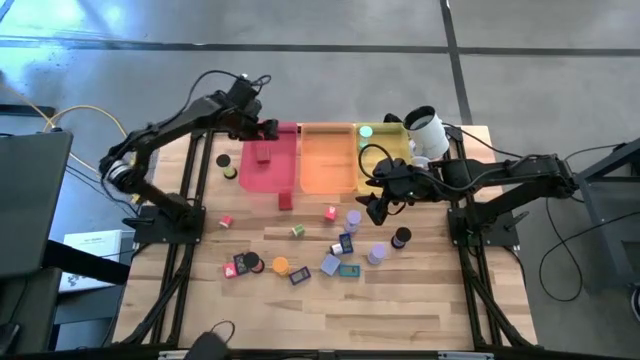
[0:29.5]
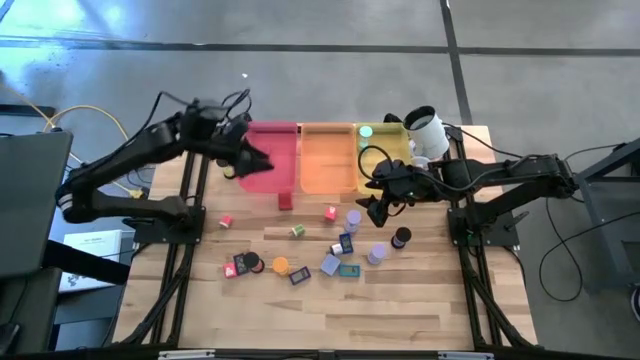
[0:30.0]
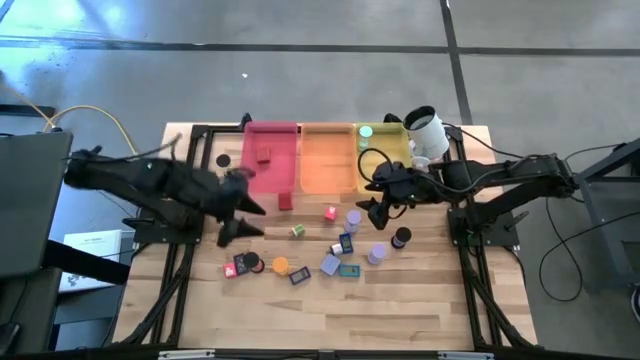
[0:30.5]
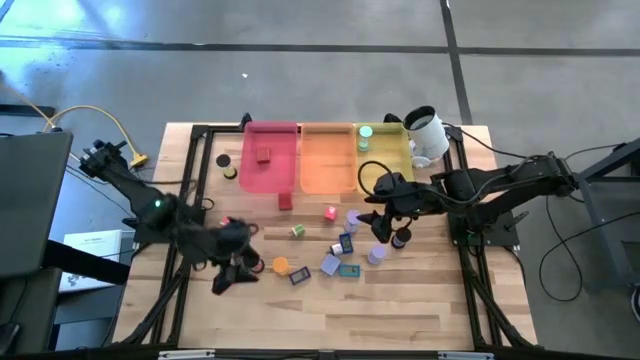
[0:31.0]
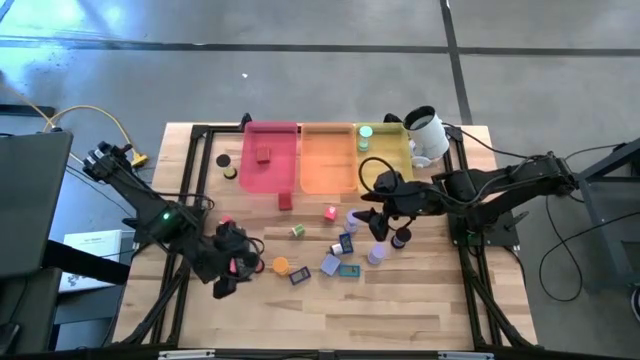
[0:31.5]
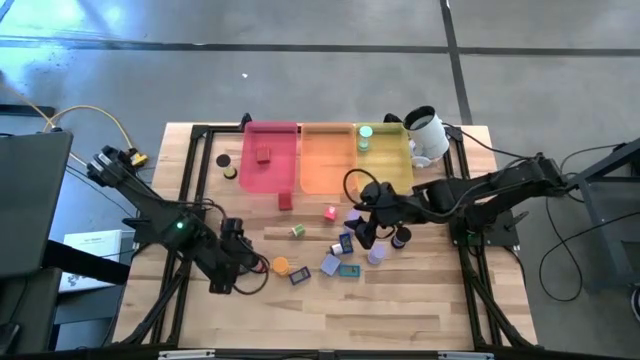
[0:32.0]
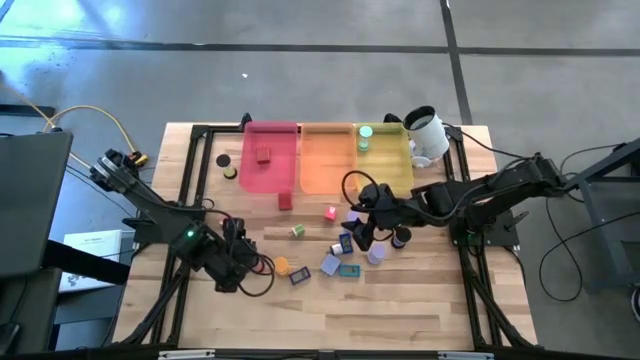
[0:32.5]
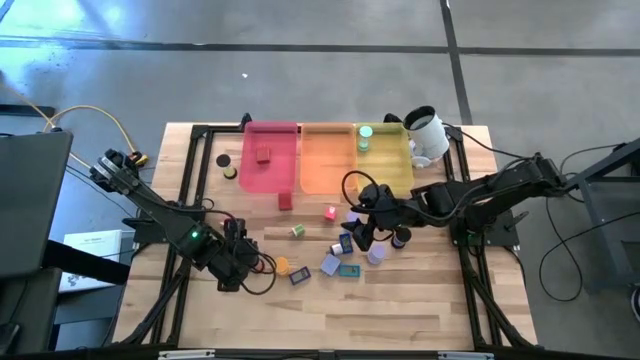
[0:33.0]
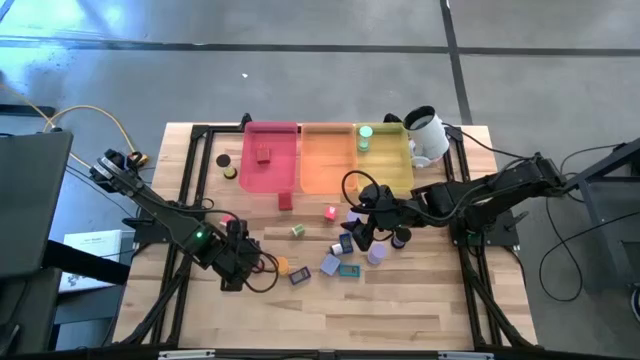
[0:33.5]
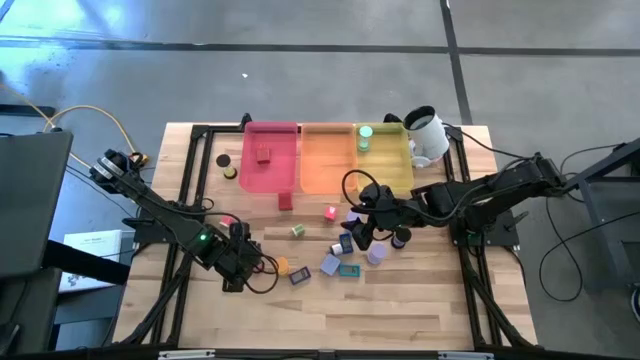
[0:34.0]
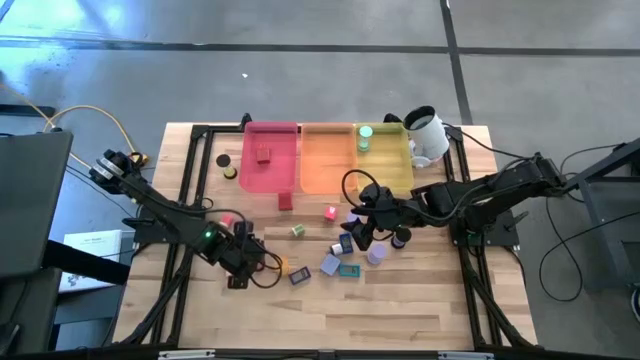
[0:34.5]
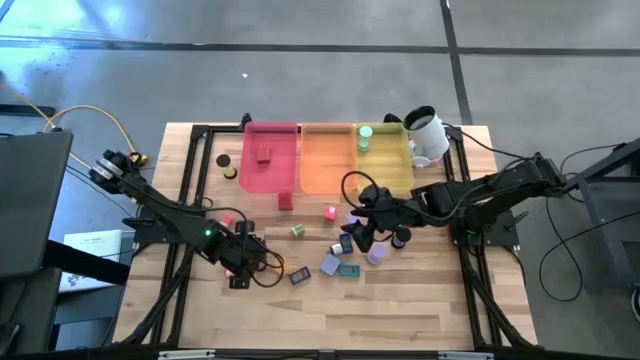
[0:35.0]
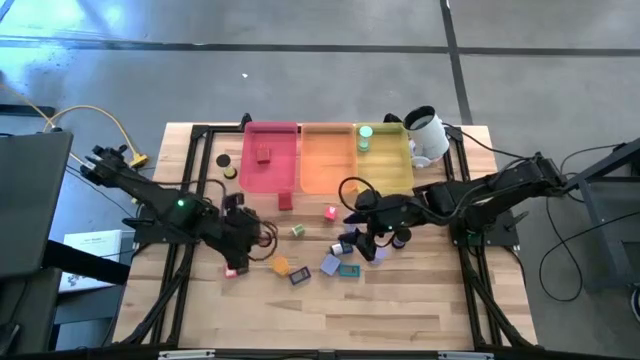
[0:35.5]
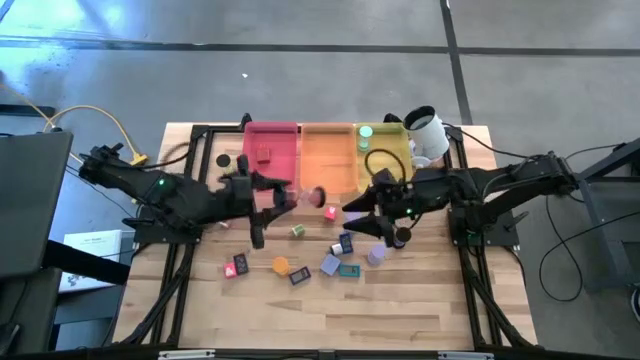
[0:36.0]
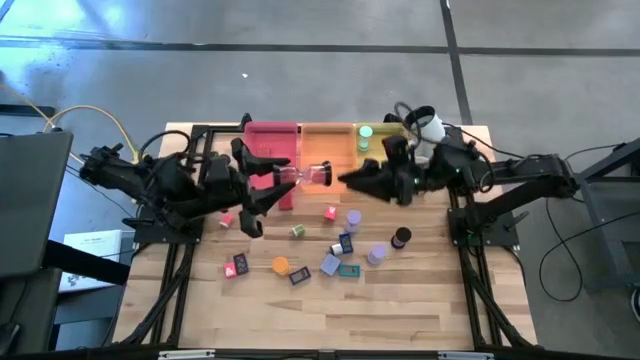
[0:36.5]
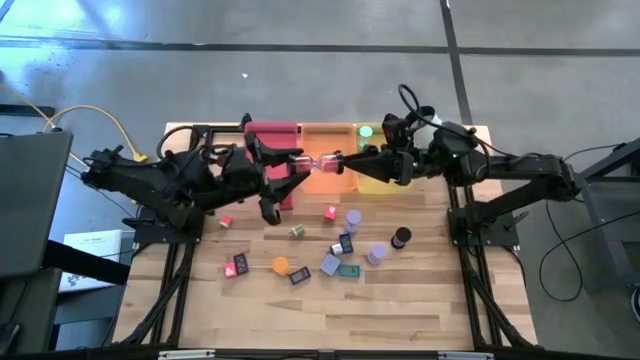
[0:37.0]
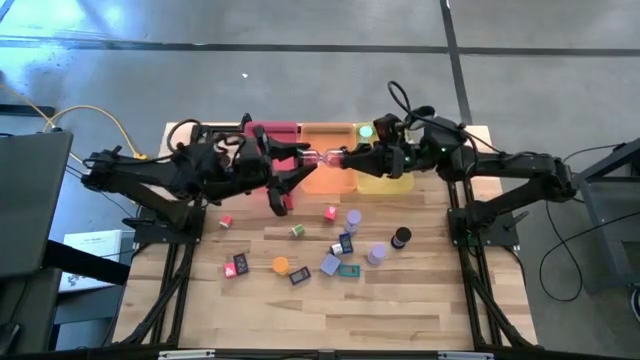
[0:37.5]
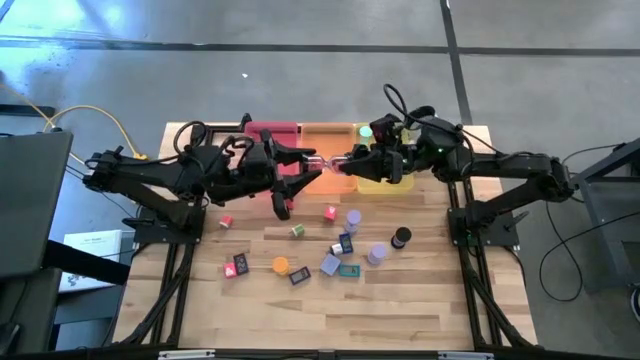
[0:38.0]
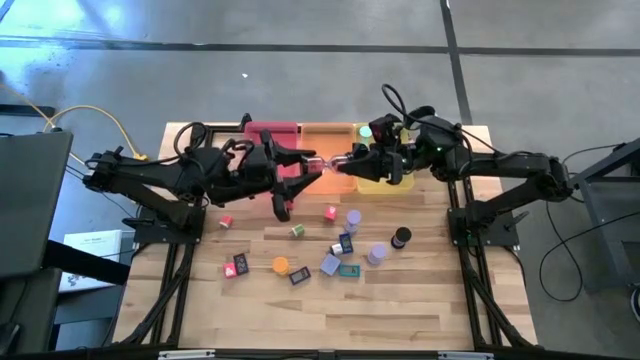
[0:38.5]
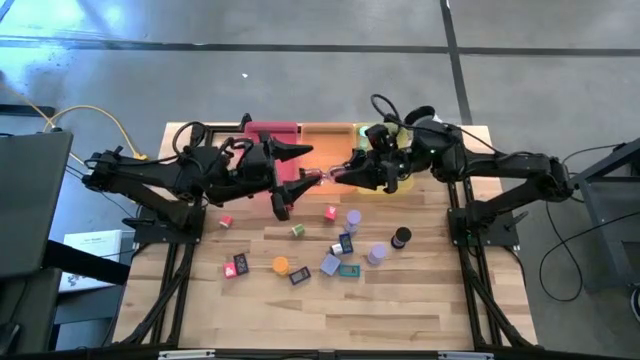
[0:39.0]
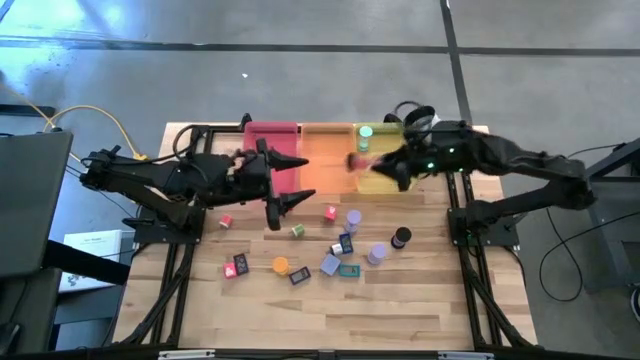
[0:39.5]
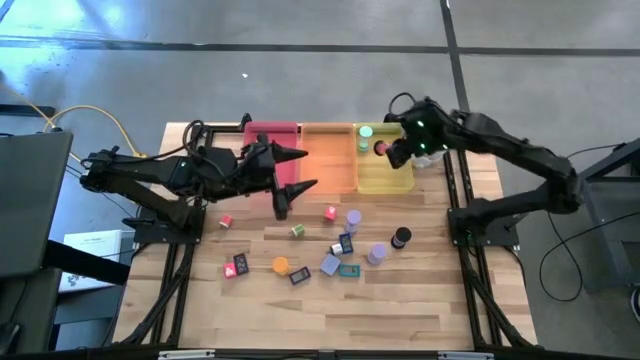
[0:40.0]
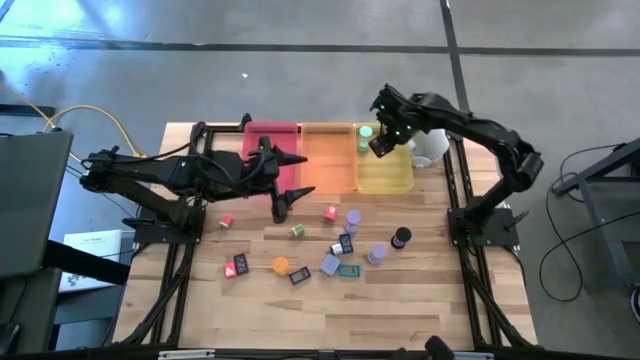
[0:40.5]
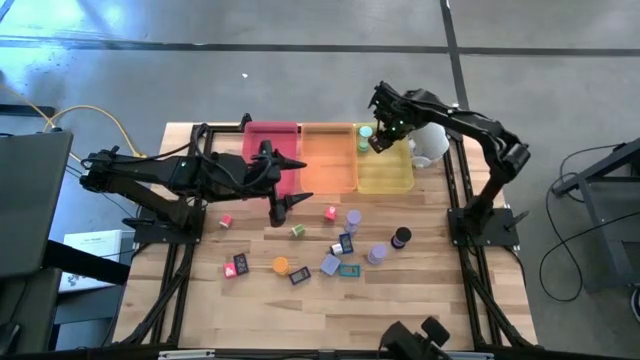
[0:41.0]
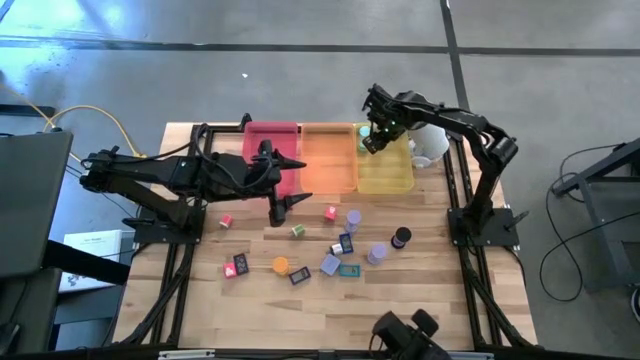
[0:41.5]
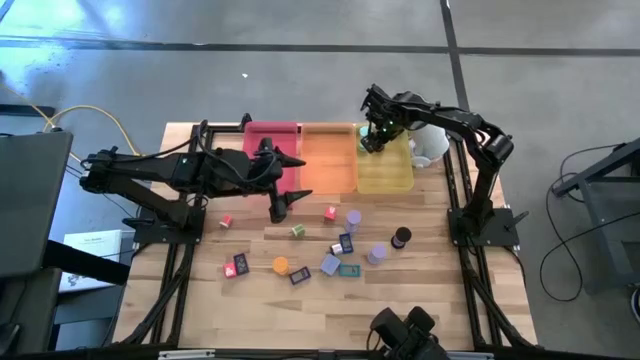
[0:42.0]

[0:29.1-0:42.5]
Task: Pick & Place Office items
Put the bottom left black hourglass into the yellow bin

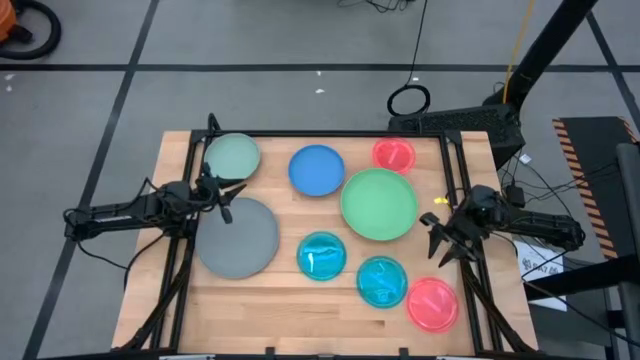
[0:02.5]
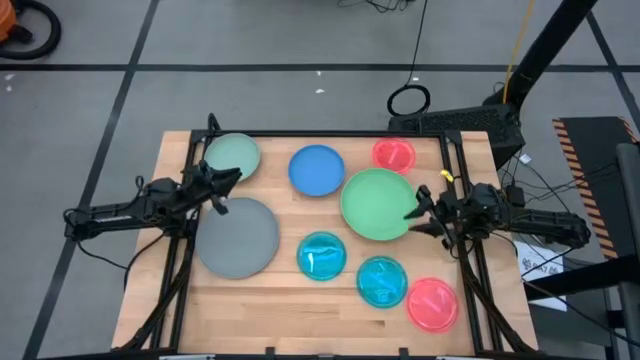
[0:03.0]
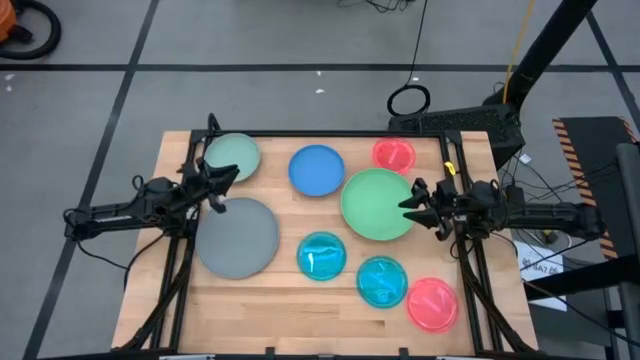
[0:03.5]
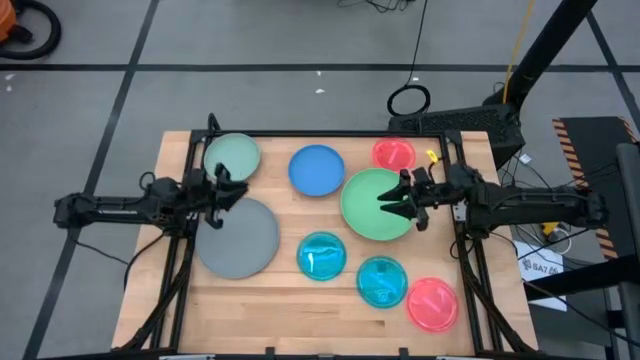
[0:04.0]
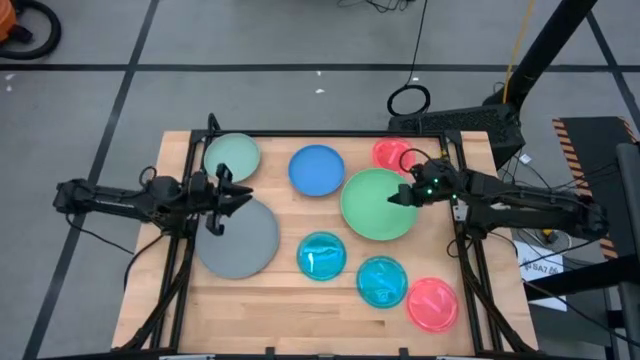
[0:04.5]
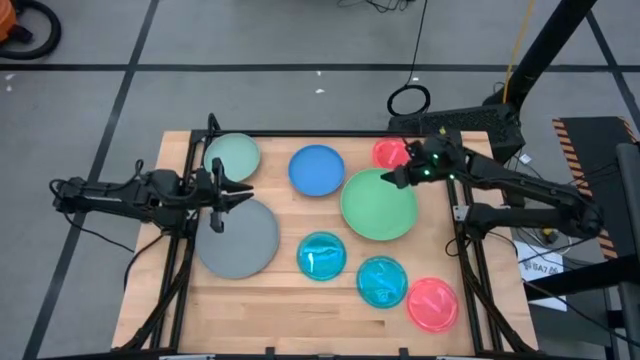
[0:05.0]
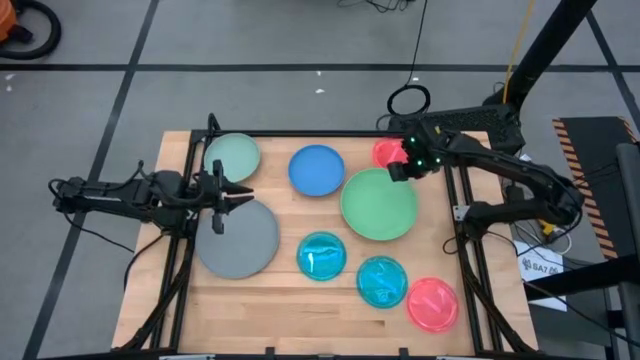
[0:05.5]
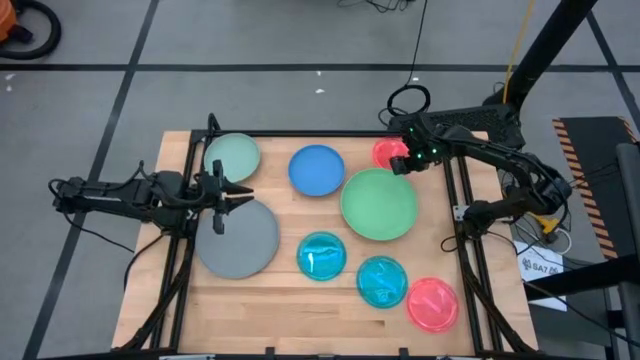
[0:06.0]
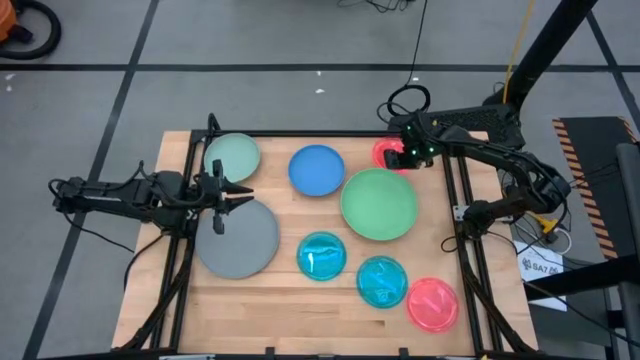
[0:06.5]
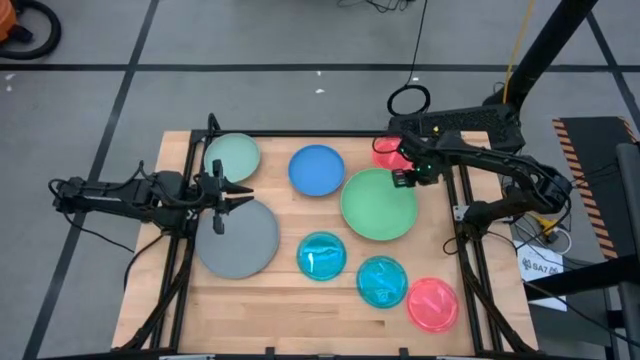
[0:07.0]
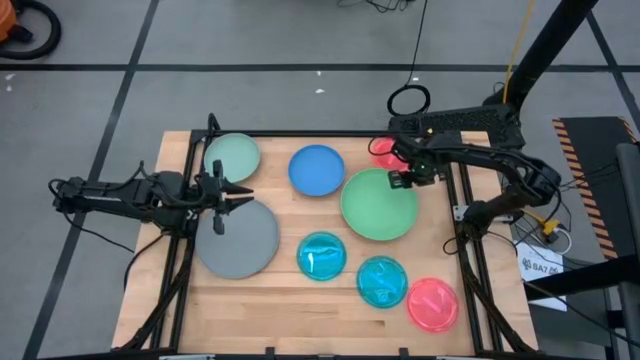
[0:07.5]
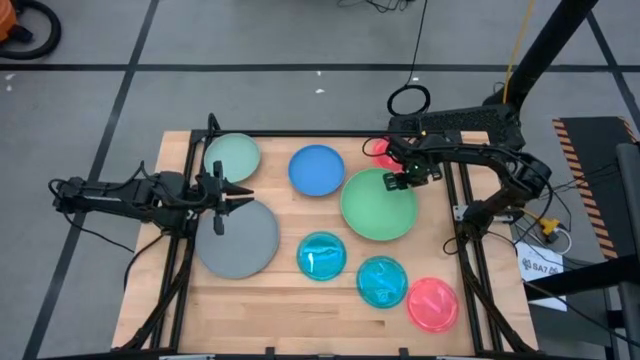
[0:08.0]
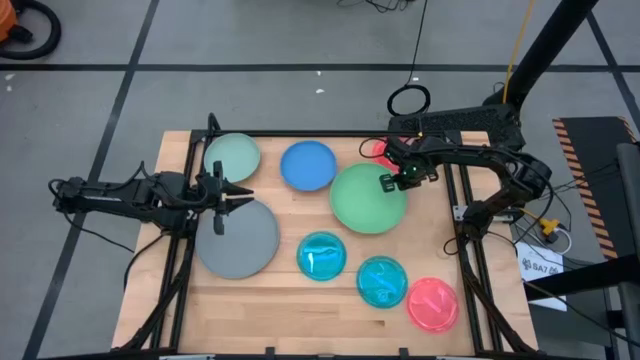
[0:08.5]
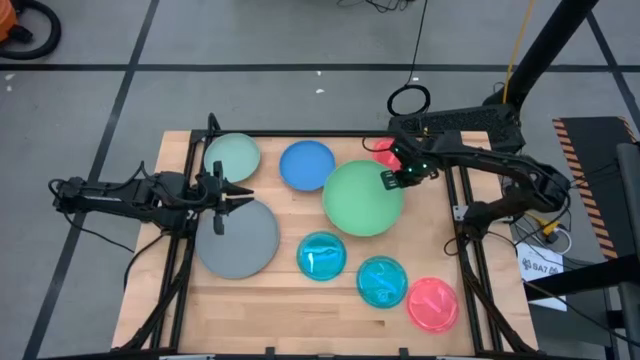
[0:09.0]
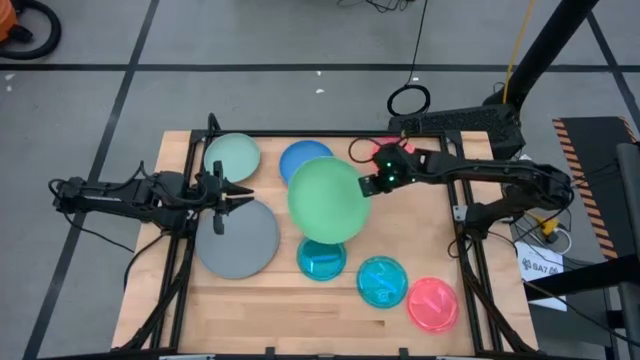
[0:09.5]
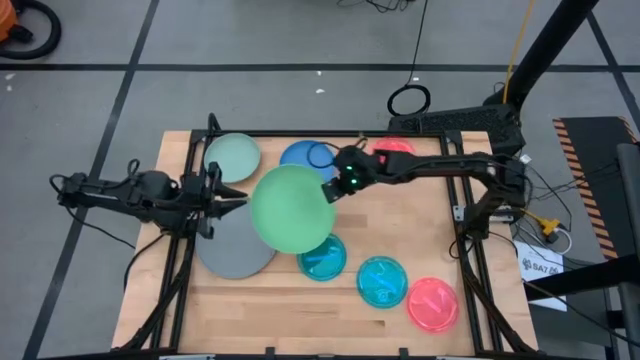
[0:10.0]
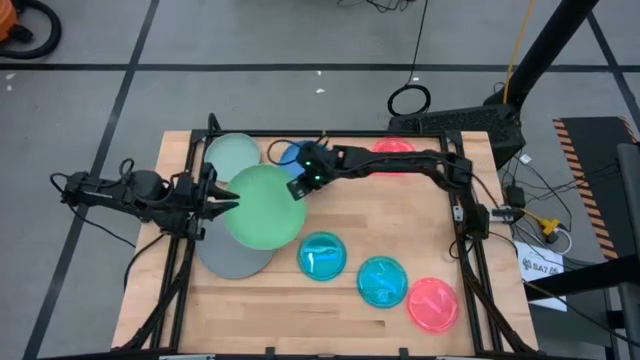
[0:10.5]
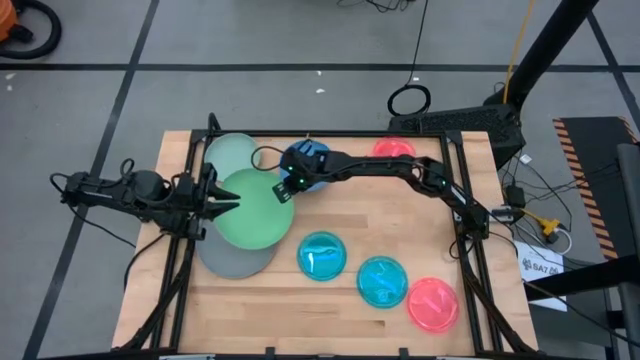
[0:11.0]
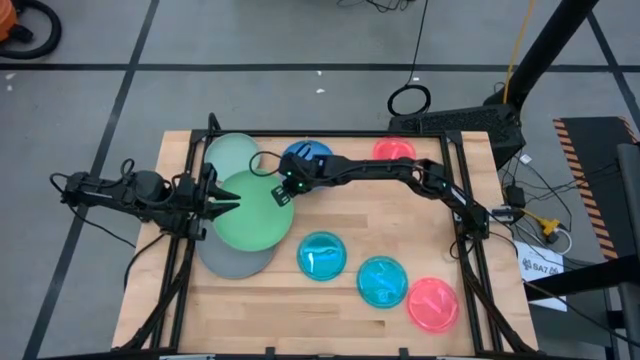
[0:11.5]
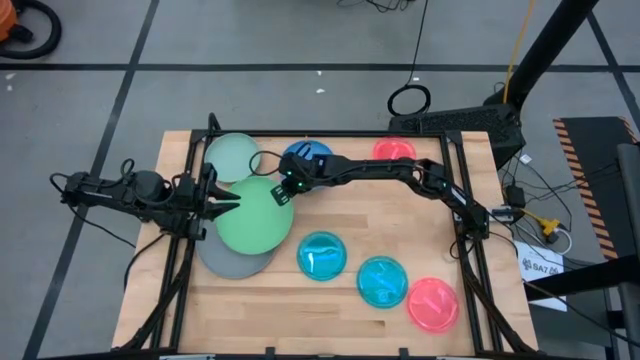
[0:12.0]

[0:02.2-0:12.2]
Task: Stack plastic plates
Stack green plate on top of the gray plate
